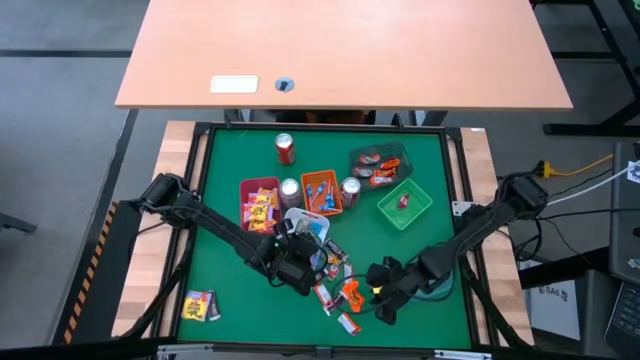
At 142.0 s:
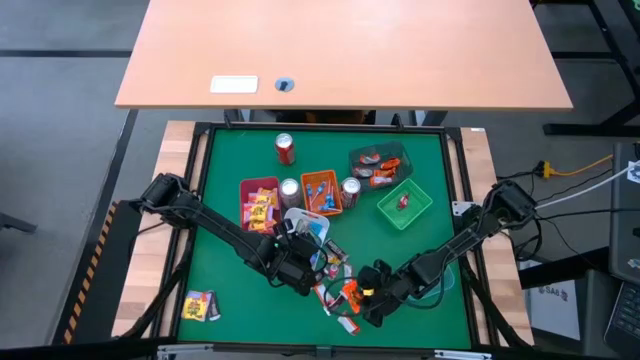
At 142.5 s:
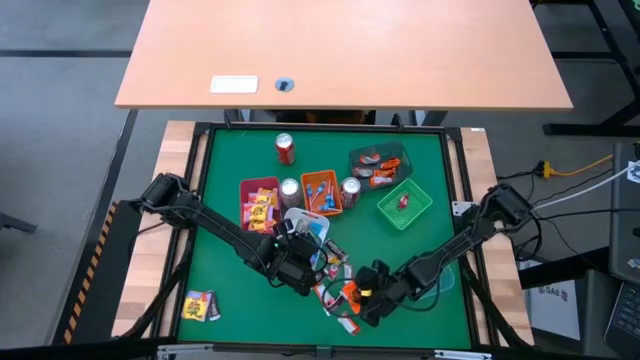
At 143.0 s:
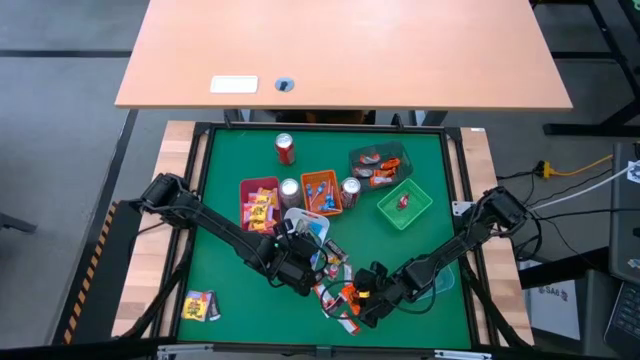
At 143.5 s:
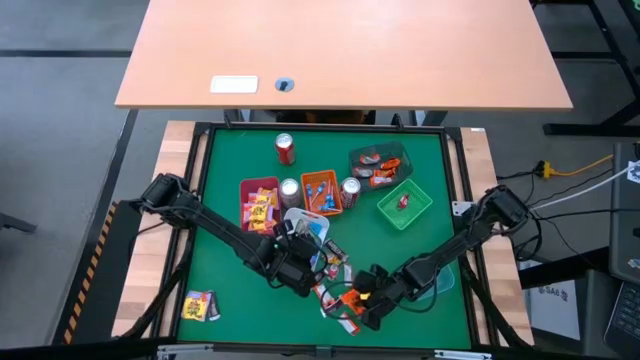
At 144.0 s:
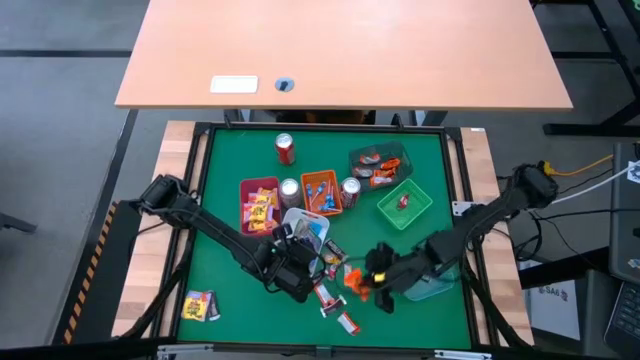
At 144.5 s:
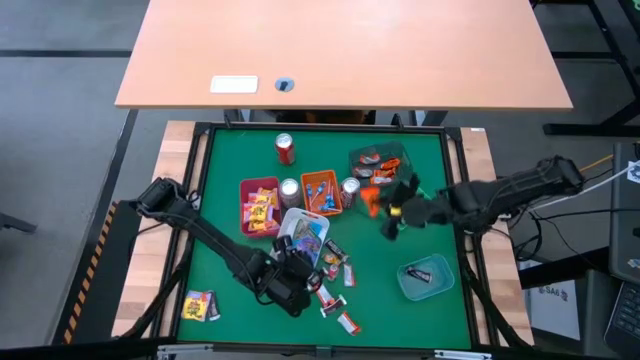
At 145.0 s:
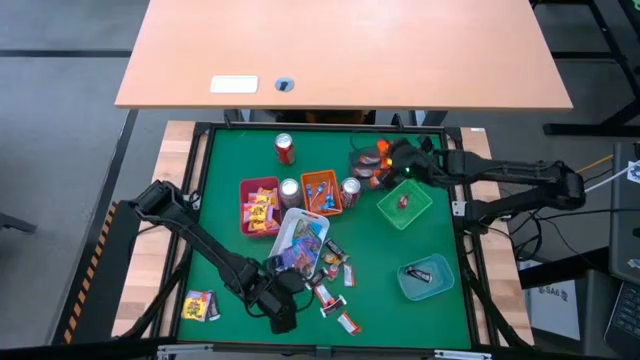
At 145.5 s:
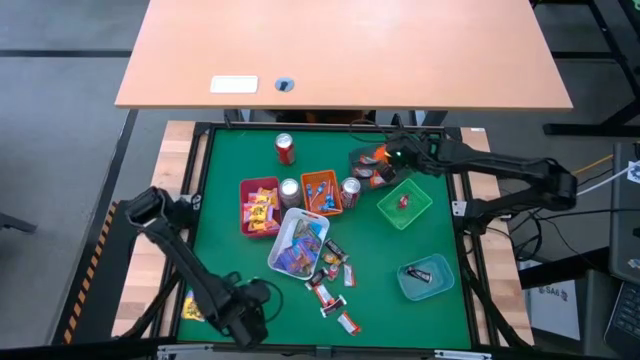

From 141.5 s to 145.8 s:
Task: Sort candy
Put the orange candy into the black bin

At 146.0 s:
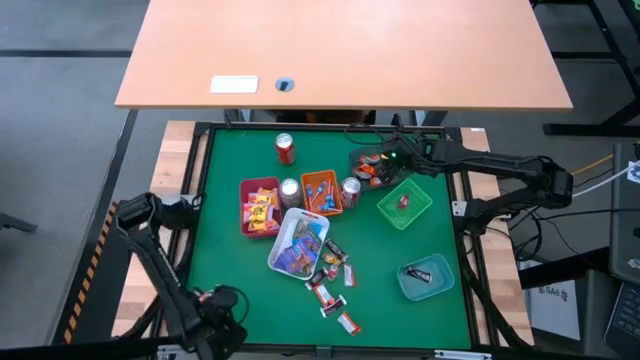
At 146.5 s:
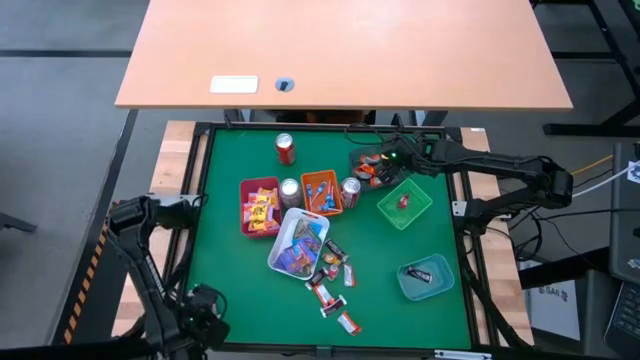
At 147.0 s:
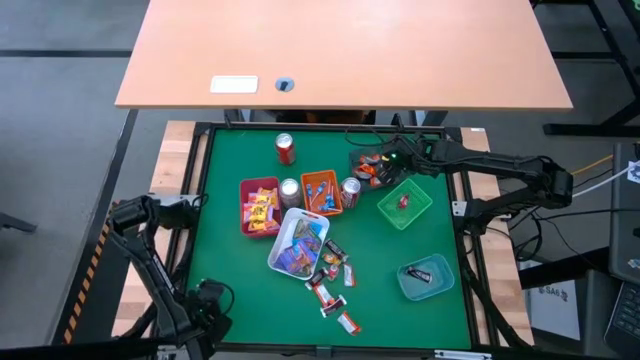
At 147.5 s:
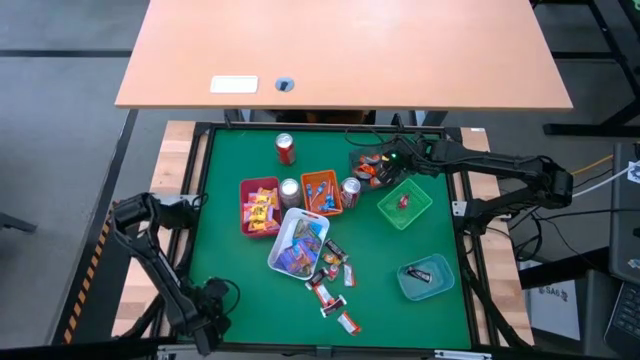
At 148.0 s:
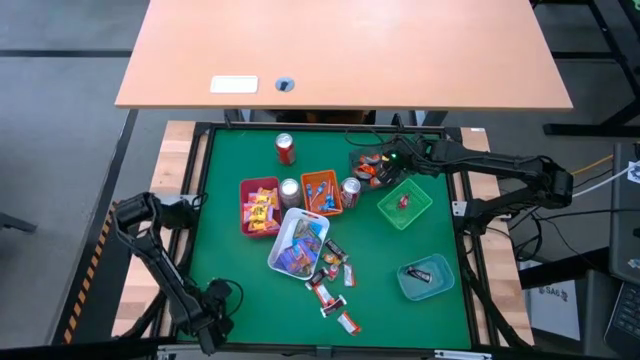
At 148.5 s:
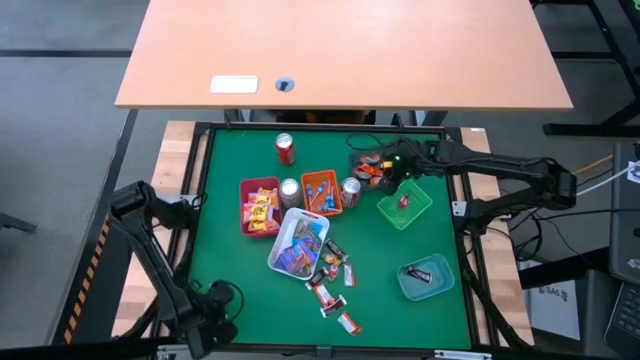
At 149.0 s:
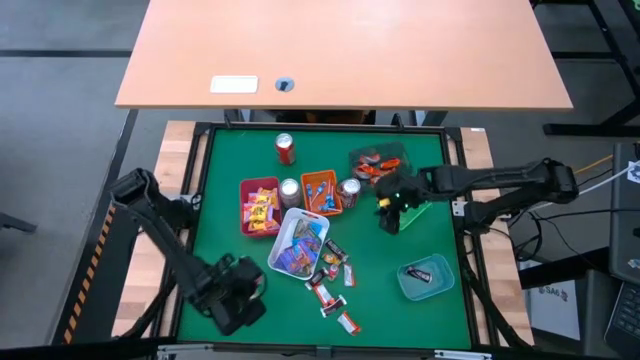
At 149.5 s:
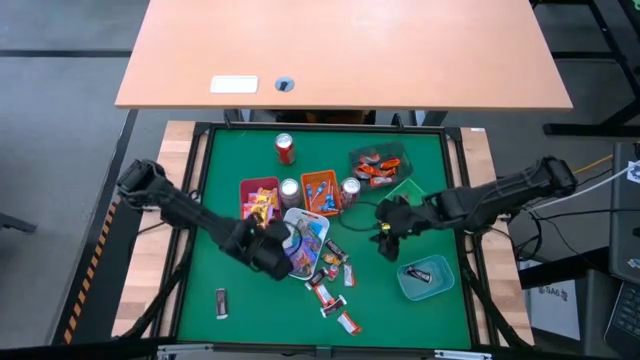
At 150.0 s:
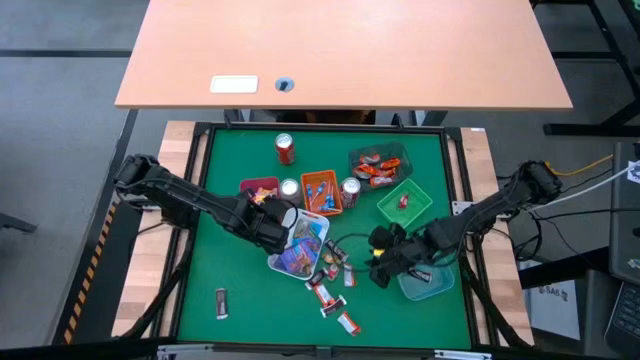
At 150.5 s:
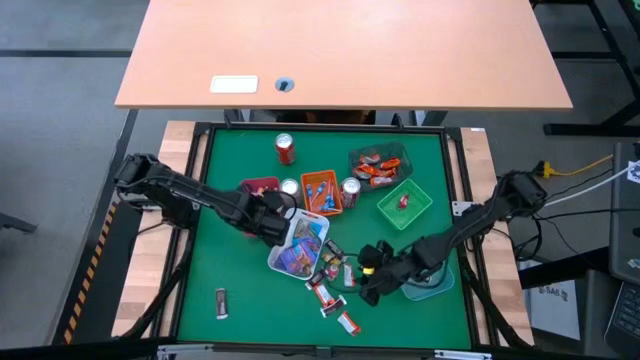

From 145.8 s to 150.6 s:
Put the yellow candy into the red bin

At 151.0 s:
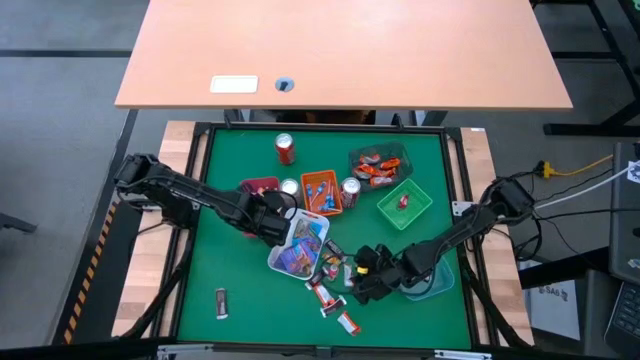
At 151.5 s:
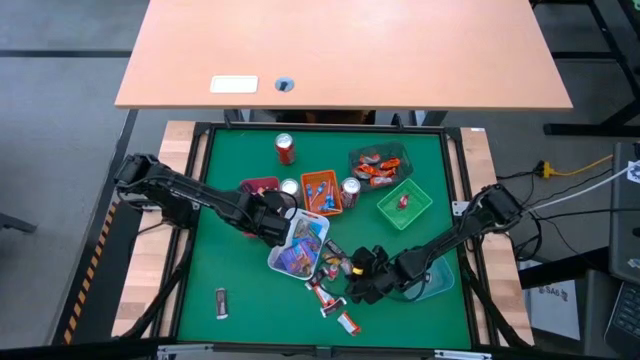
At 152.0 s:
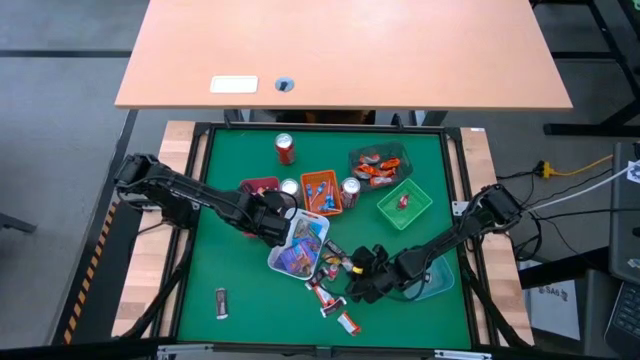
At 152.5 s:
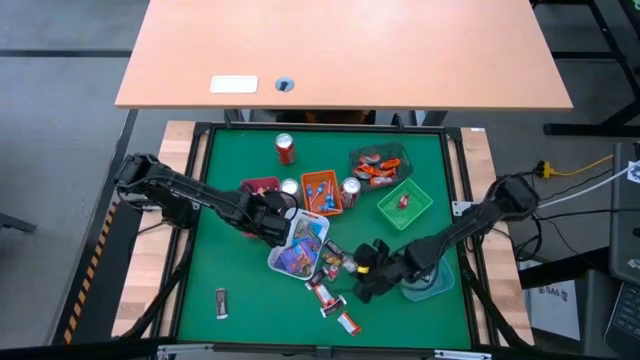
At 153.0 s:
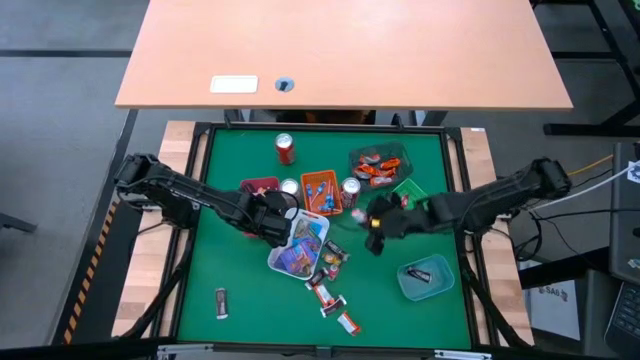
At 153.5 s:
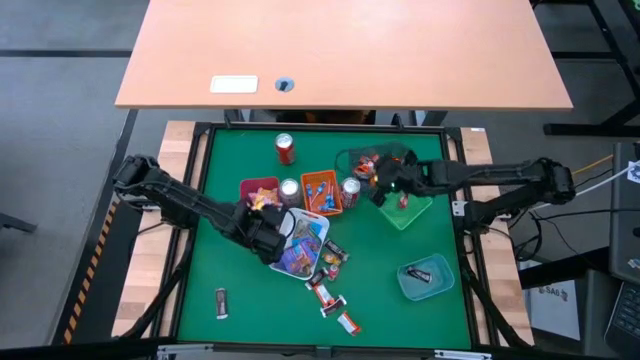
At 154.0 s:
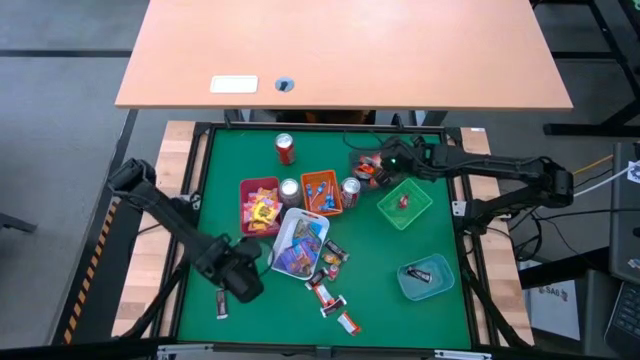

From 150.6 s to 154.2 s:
Put the orange candy into the black bin

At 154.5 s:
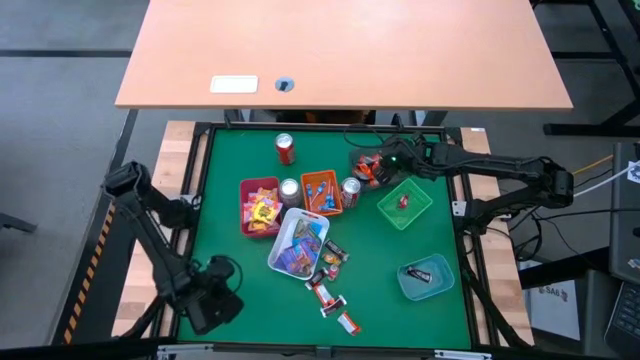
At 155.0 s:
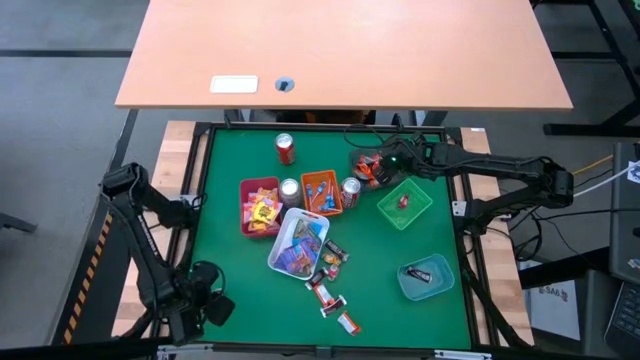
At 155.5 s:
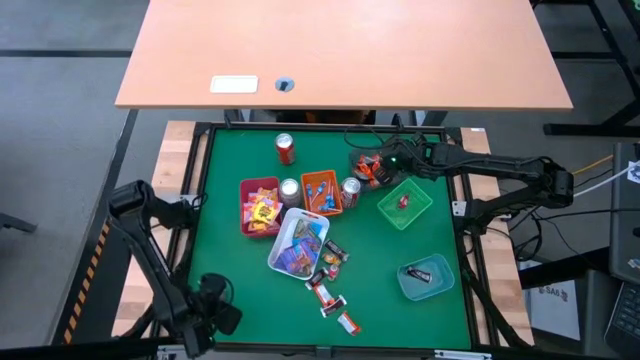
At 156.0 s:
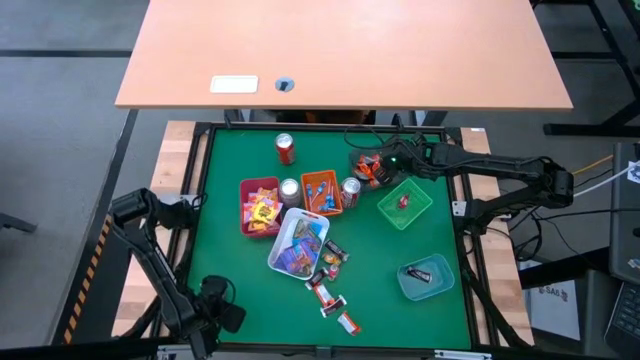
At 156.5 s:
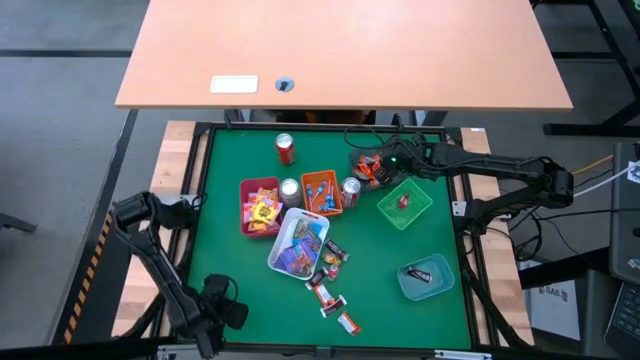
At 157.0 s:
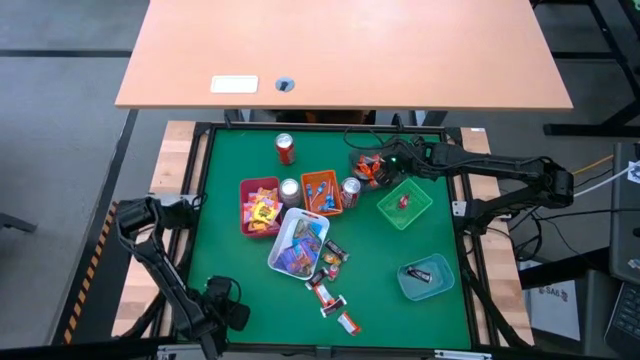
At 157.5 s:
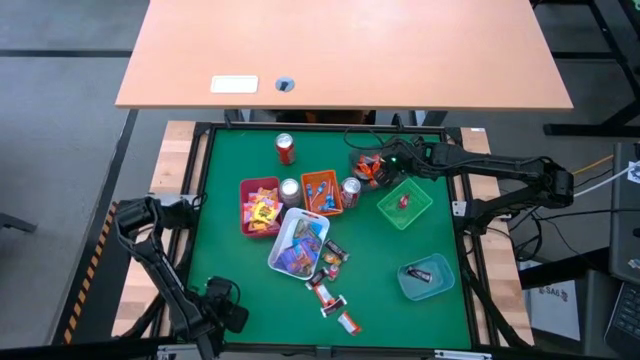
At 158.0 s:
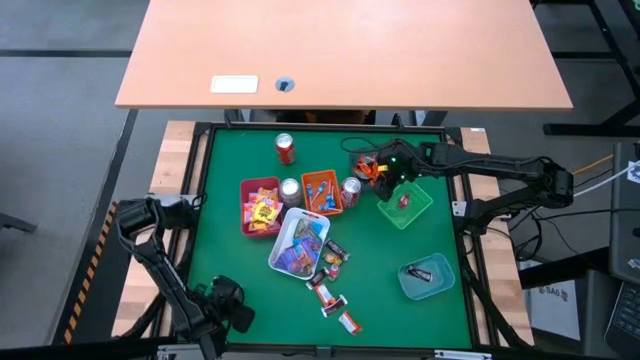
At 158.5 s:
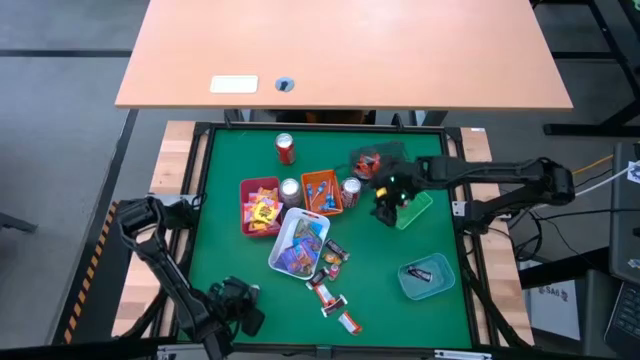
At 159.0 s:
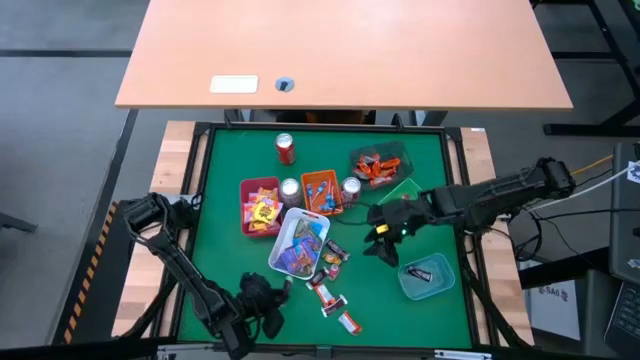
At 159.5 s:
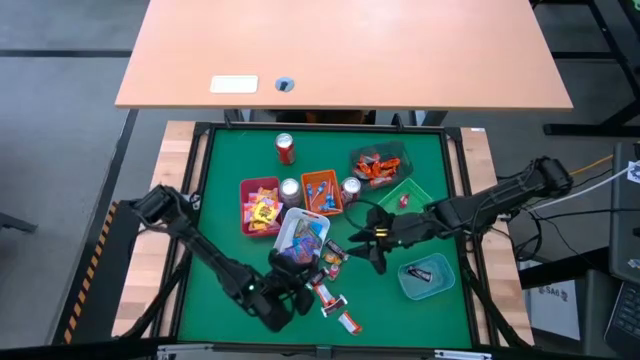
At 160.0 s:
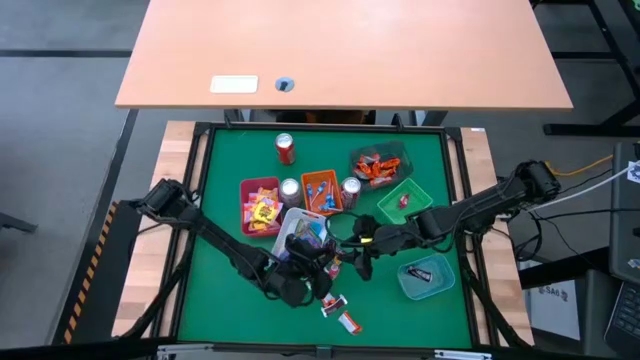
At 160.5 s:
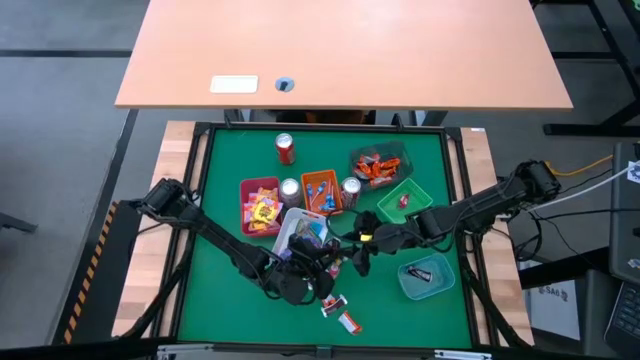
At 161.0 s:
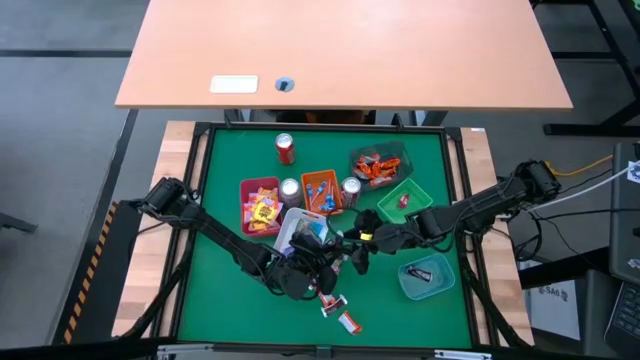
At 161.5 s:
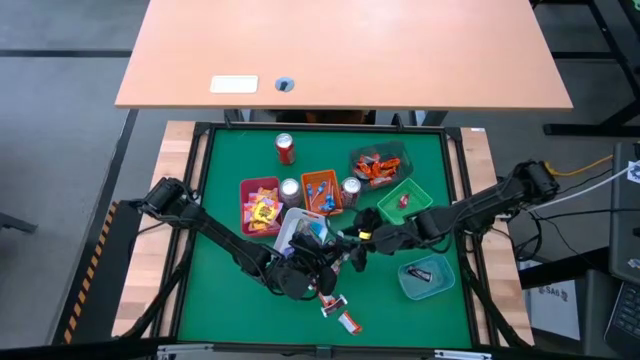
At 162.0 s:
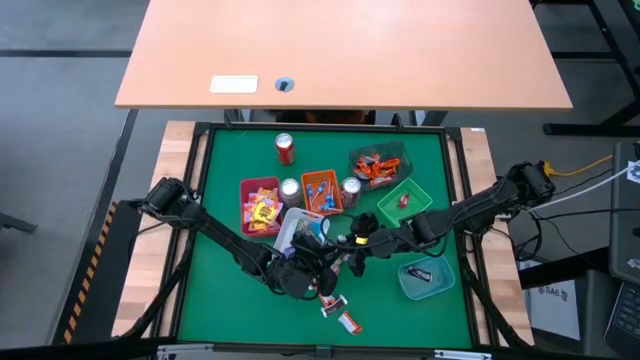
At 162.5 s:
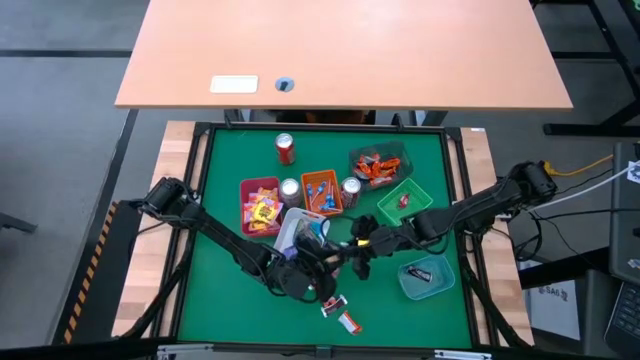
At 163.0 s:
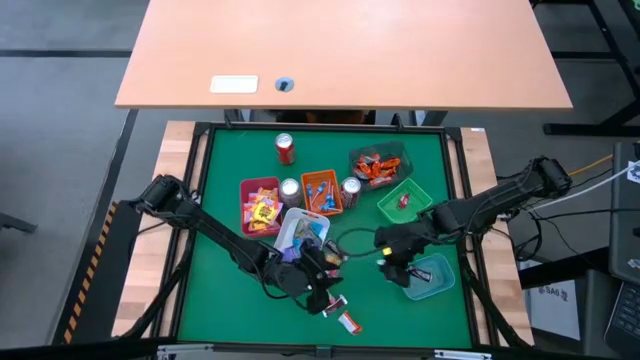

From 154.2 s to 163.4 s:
Put the brown chocolate into the blue bin
